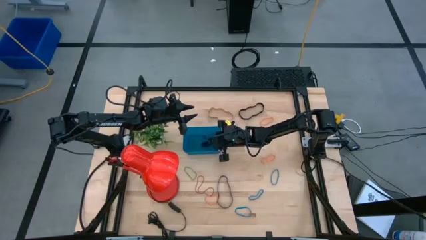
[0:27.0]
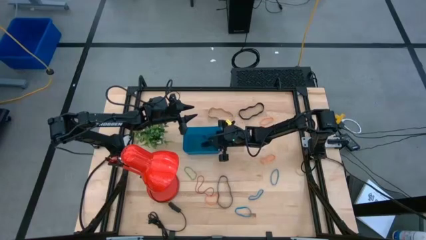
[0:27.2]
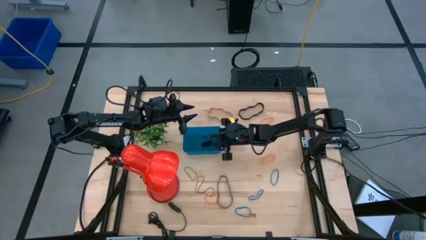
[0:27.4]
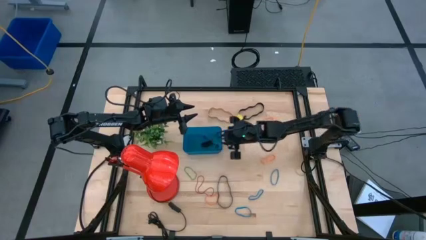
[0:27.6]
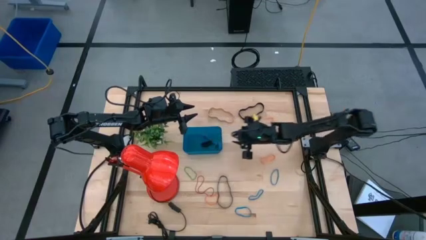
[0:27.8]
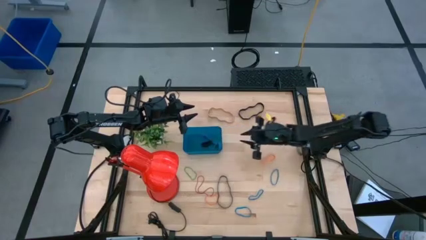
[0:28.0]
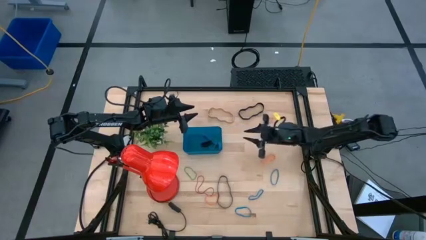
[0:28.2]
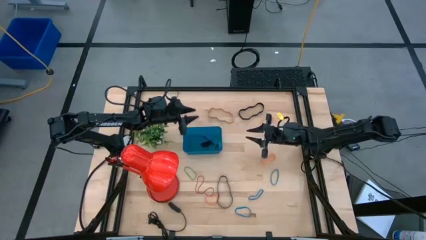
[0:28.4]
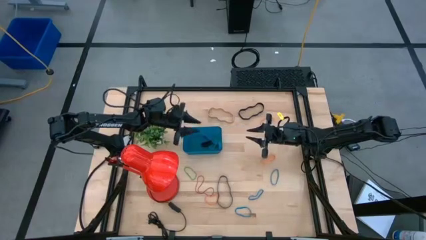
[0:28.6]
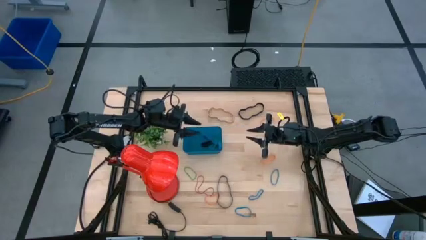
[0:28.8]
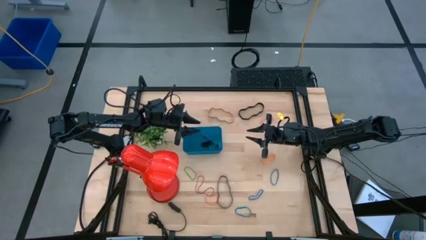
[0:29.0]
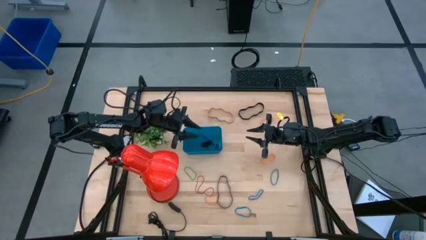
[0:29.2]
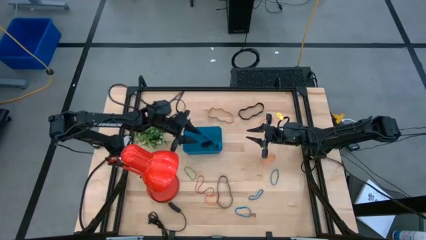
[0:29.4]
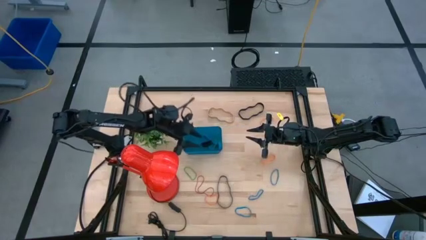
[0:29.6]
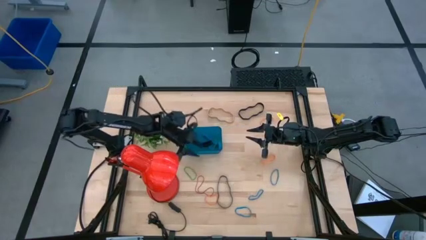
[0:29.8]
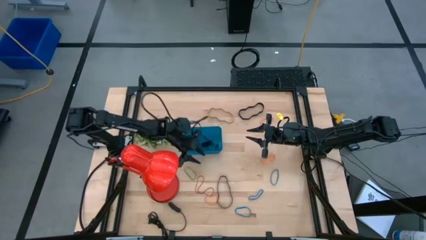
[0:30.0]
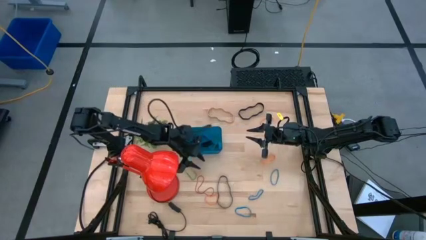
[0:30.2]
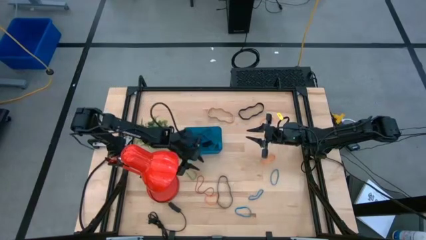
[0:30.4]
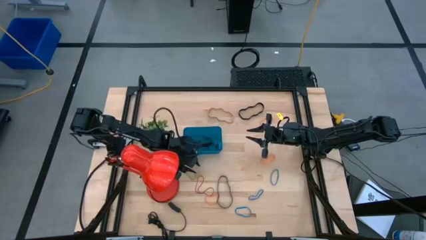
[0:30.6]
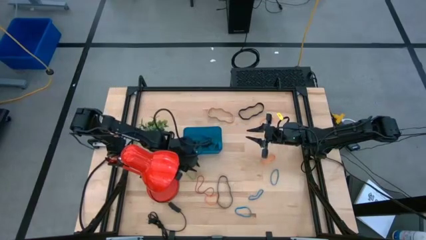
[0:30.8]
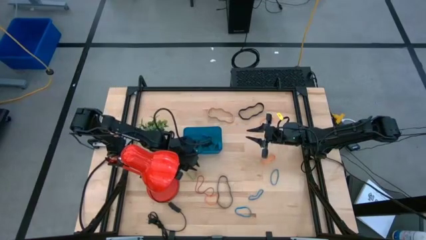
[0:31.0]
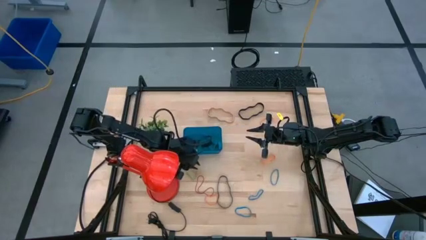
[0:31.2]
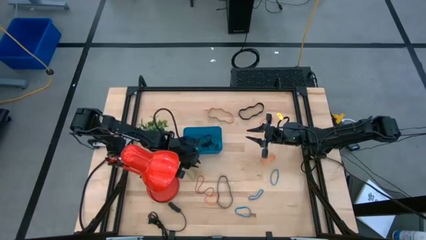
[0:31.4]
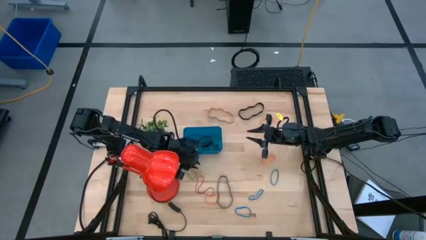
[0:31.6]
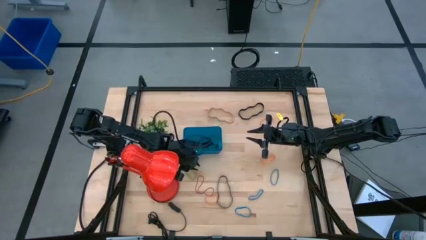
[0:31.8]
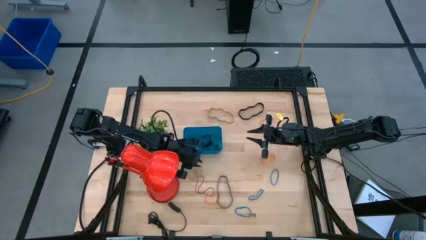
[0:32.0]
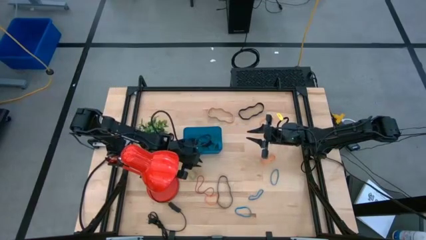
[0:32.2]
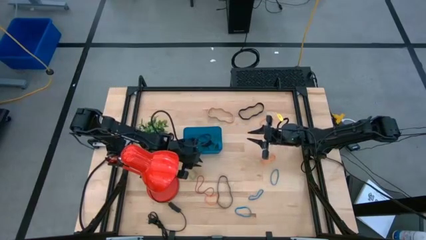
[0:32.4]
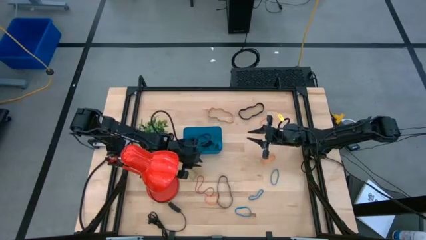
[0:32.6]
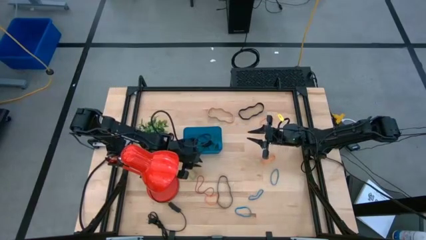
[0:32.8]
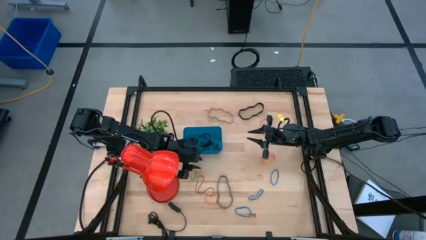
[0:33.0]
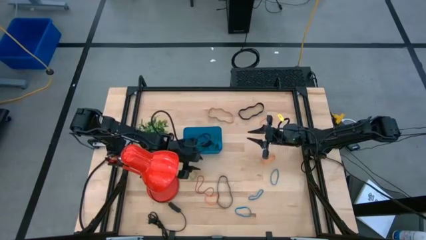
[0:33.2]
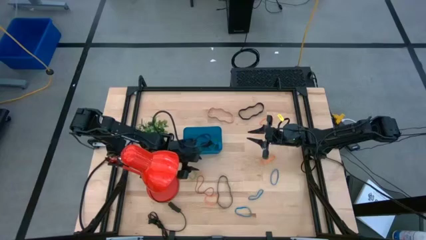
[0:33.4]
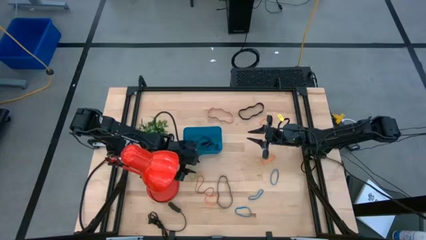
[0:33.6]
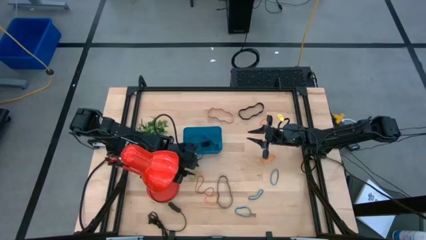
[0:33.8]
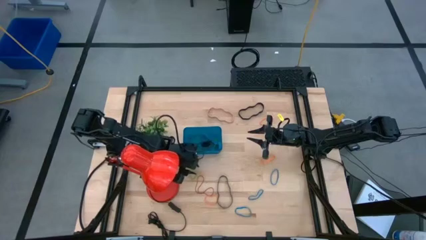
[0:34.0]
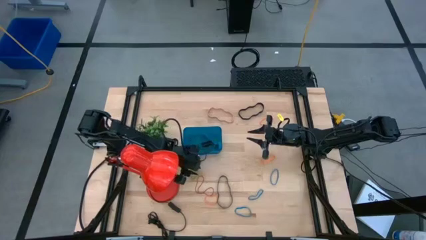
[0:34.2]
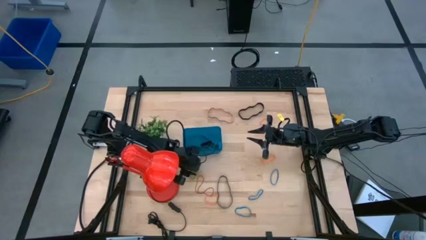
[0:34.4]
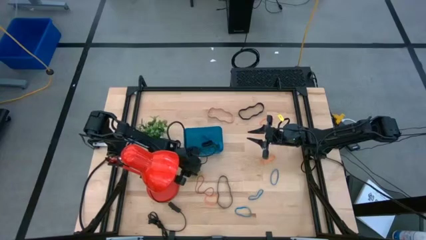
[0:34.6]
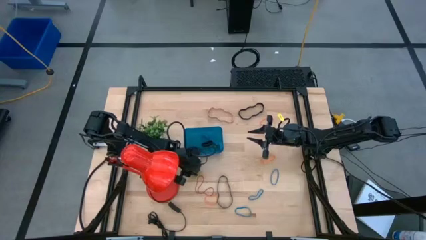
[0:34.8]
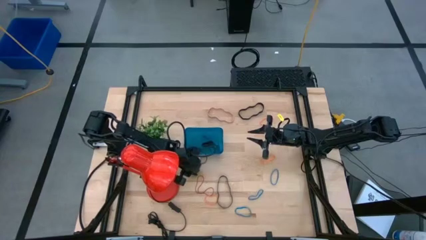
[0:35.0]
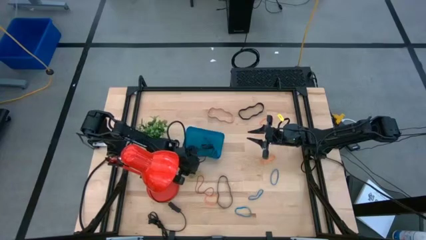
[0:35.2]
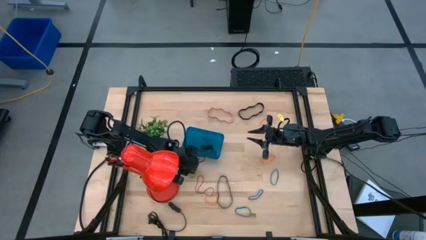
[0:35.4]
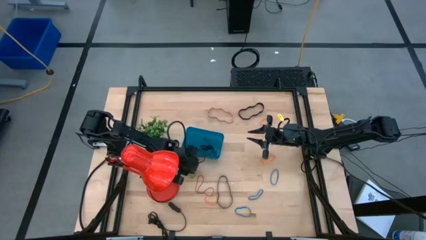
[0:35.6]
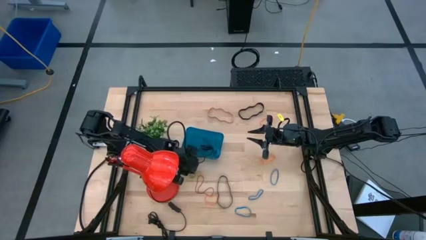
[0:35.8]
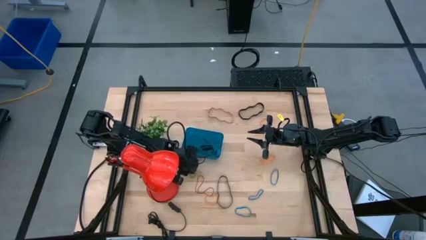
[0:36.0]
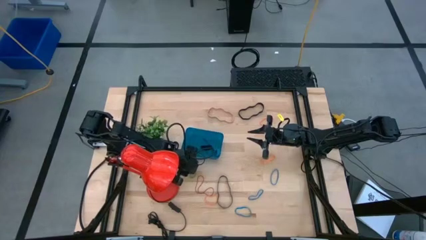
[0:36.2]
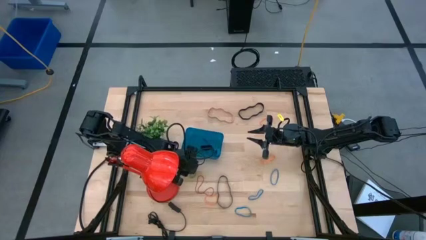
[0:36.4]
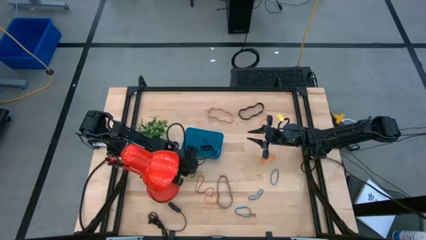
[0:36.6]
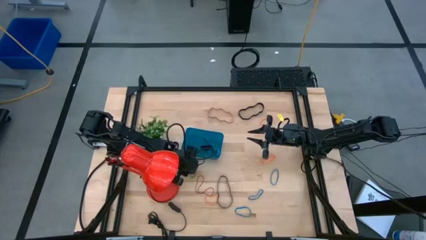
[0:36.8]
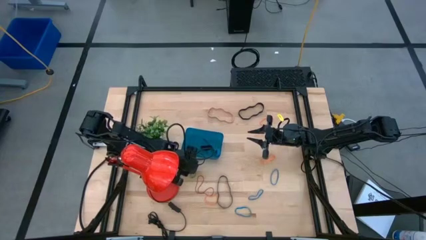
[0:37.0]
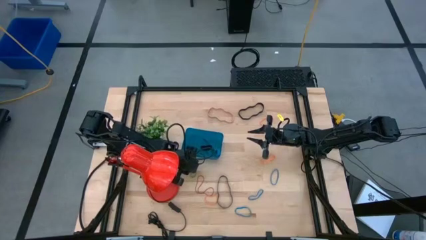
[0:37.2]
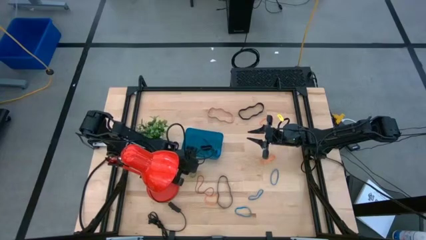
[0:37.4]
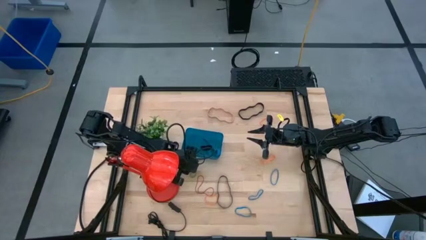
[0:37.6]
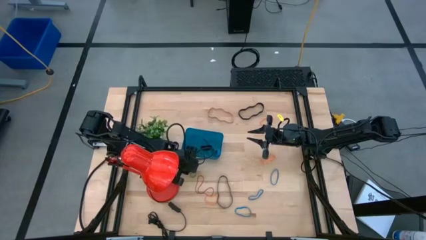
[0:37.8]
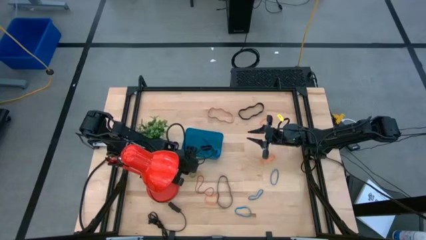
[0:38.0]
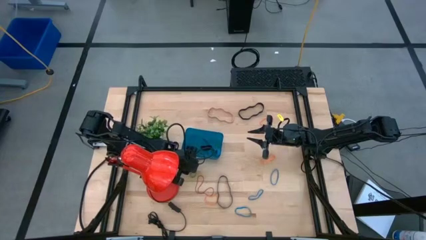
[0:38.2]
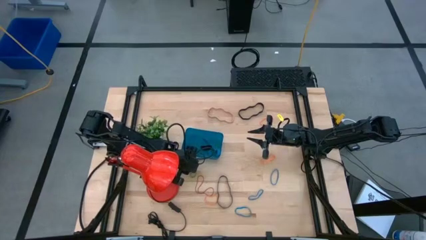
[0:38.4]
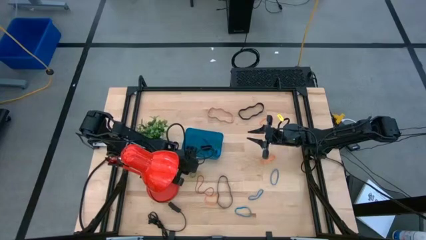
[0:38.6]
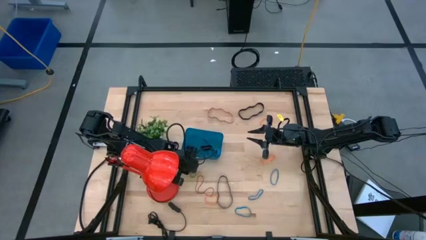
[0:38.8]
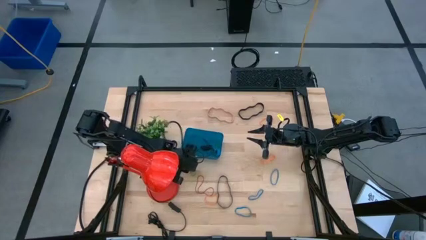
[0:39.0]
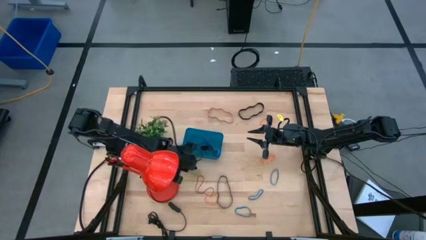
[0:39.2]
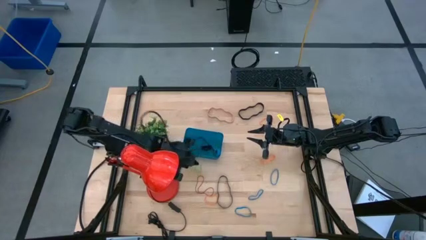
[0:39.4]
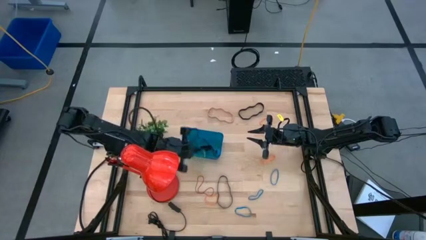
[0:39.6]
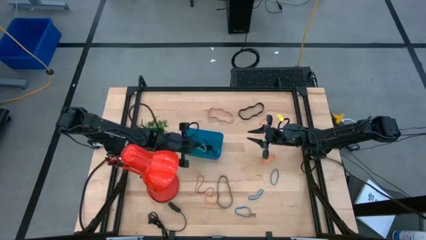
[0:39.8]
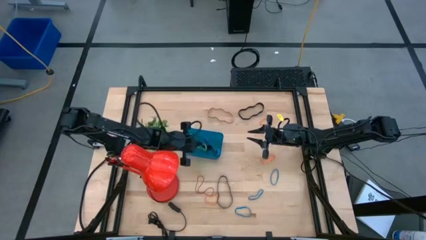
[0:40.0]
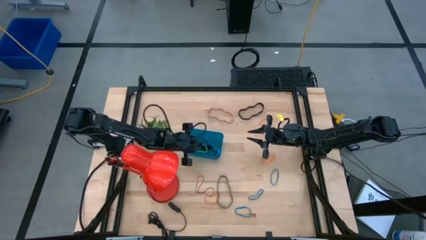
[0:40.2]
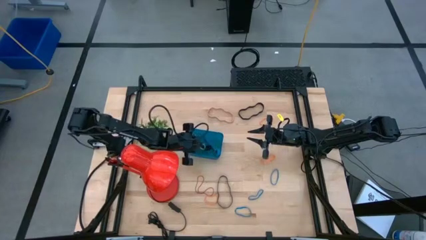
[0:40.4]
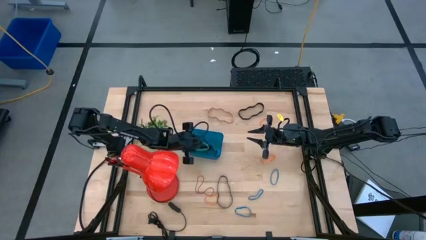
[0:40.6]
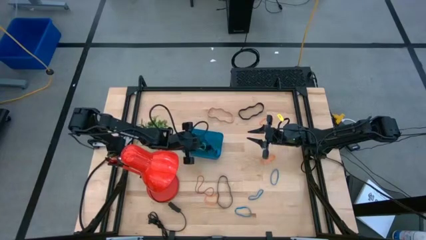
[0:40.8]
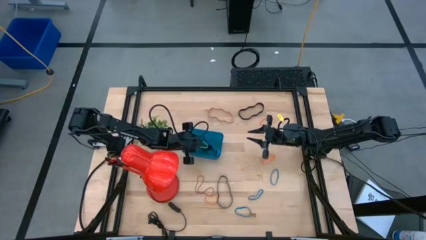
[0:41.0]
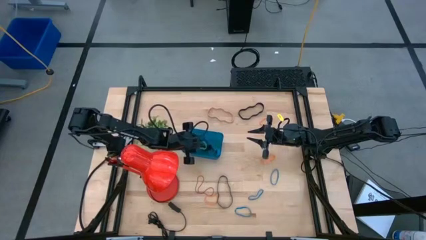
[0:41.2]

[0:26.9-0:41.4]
Task: Pick and place rubber bands into bin
Put the green rubber band into the blue bin

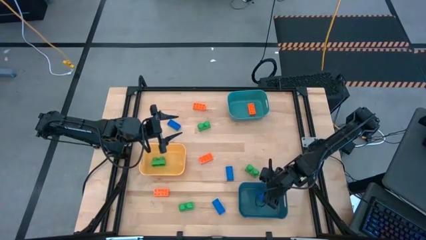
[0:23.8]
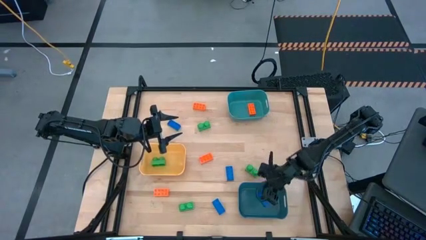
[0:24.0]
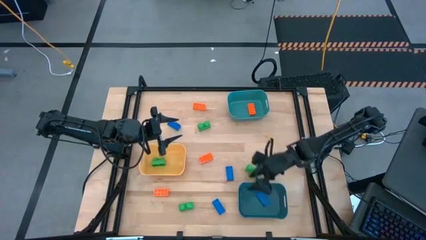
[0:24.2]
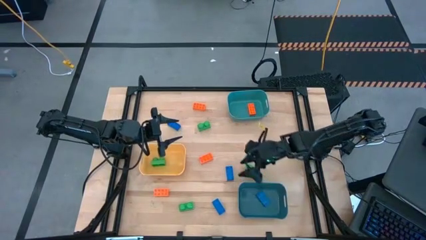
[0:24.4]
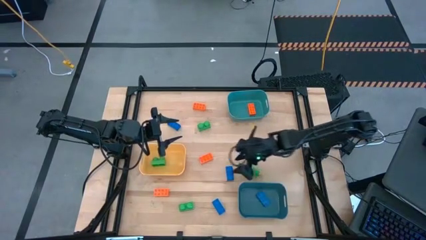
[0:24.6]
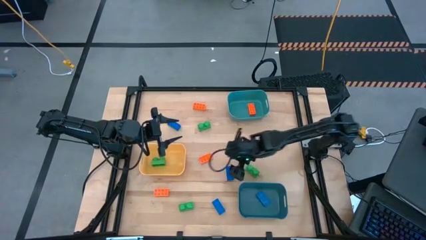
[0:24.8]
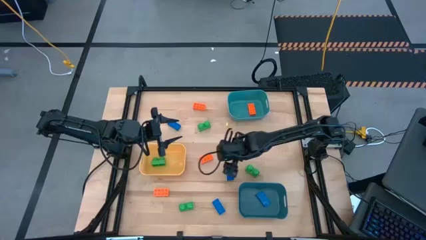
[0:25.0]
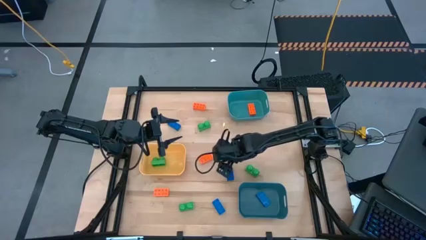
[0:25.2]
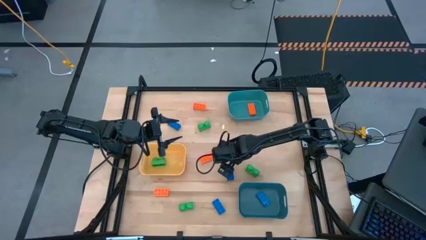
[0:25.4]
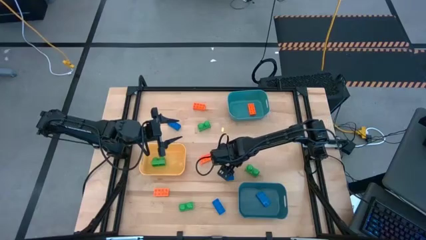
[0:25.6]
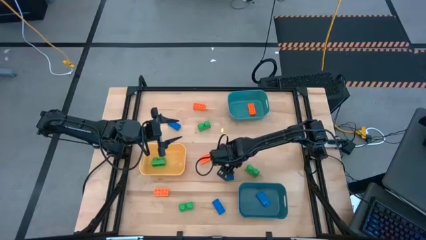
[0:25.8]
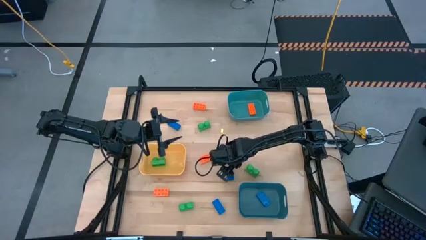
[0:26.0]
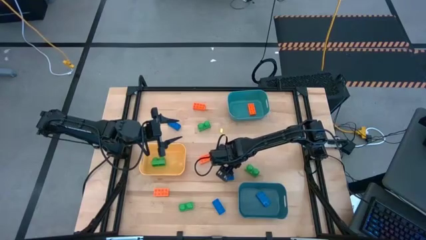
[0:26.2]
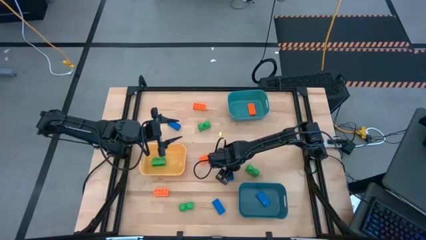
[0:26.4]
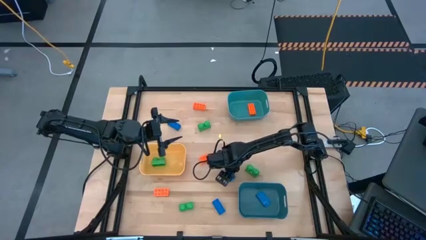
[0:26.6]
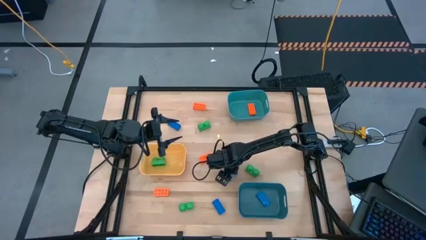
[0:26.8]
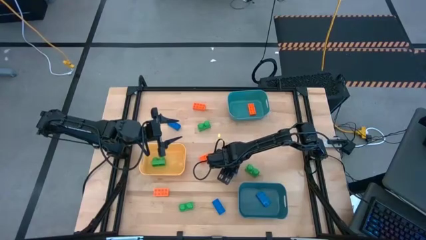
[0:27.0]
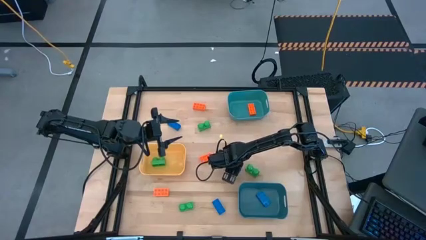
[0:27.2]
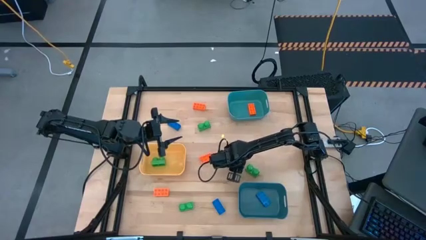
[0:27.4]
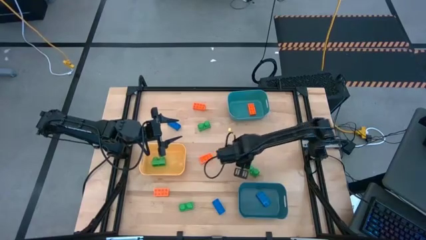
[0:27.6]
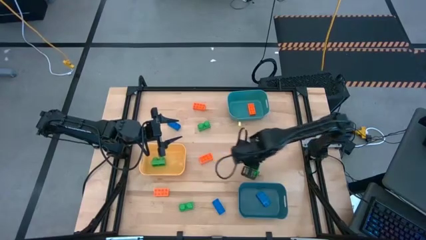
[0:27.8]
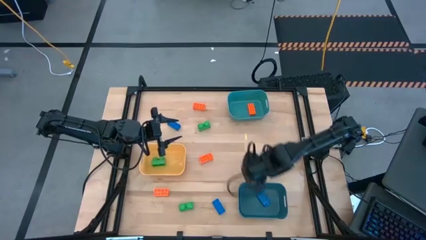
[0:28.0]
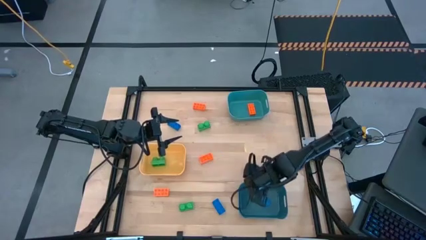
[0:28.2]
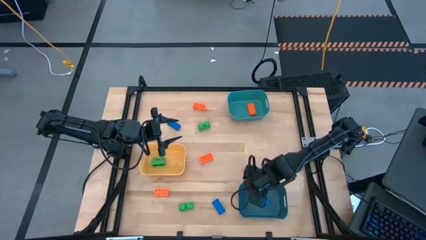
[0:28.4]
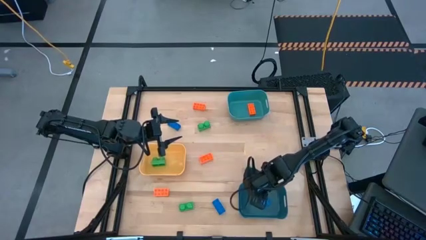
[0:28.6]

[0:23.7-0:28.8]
Task: Sort & place blocks by color
Put the blue game piece into the blue bin
